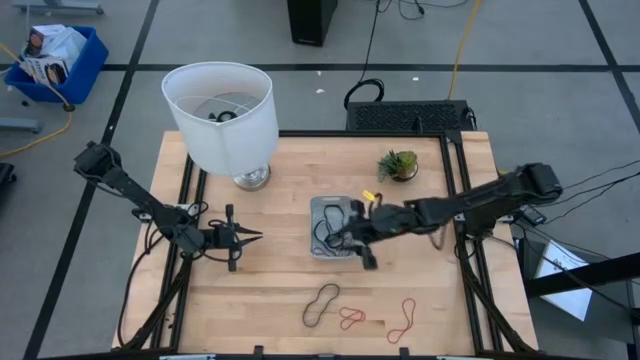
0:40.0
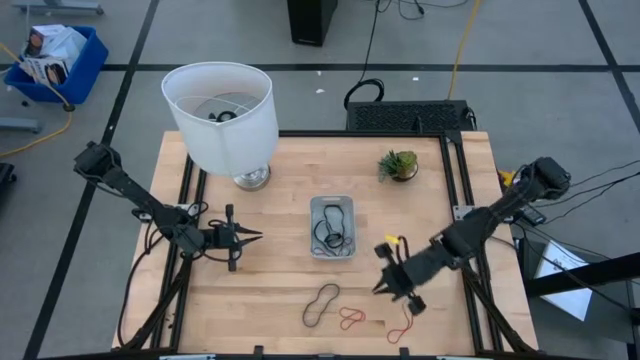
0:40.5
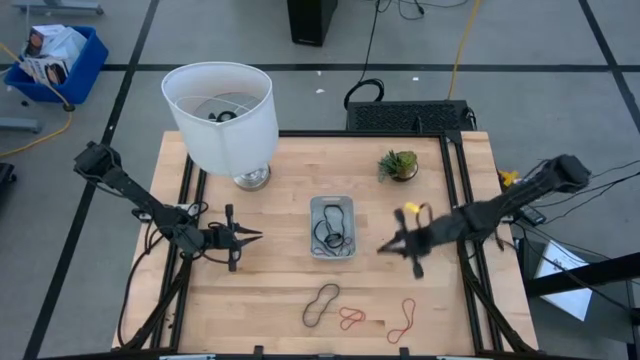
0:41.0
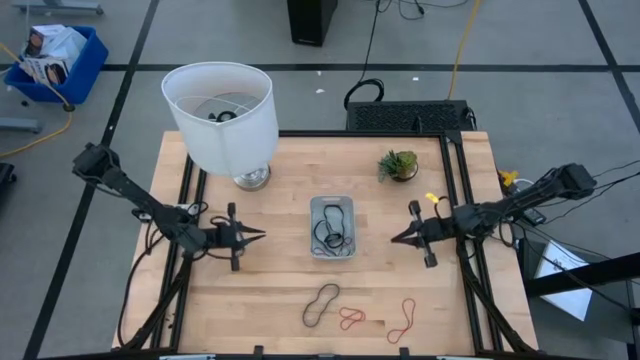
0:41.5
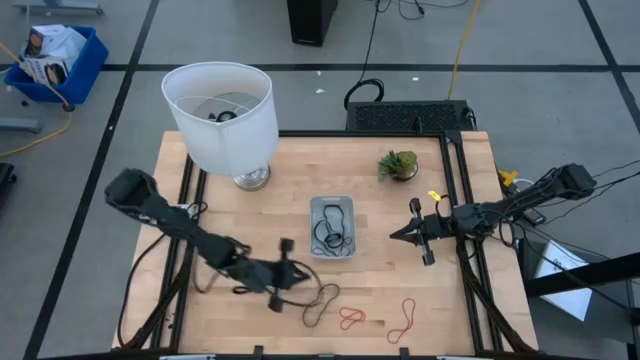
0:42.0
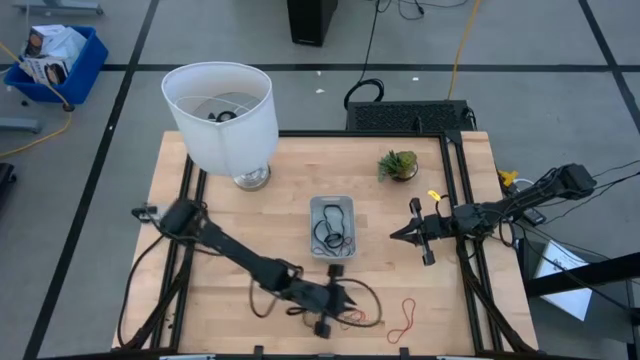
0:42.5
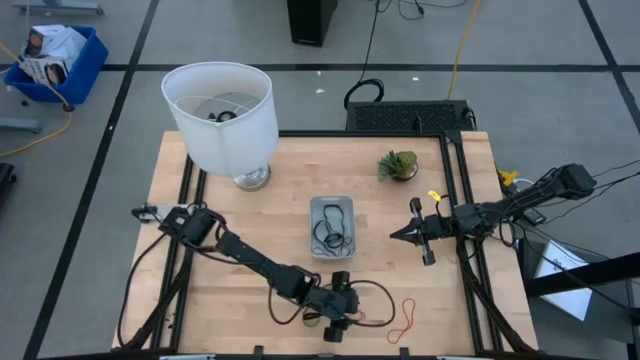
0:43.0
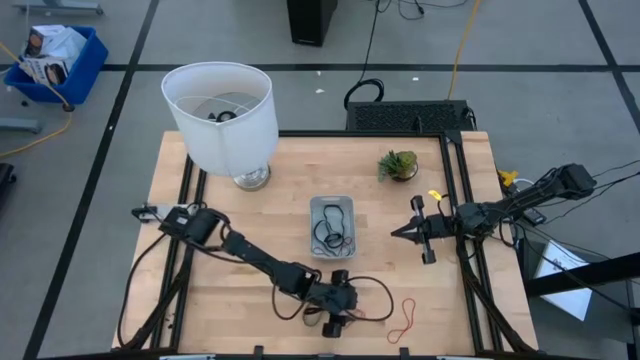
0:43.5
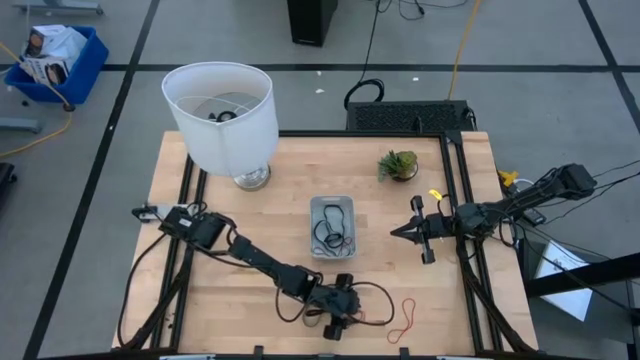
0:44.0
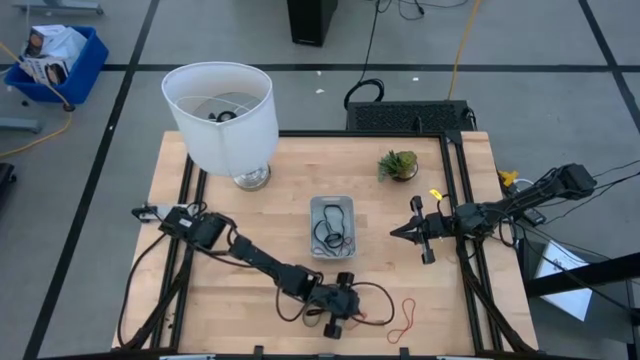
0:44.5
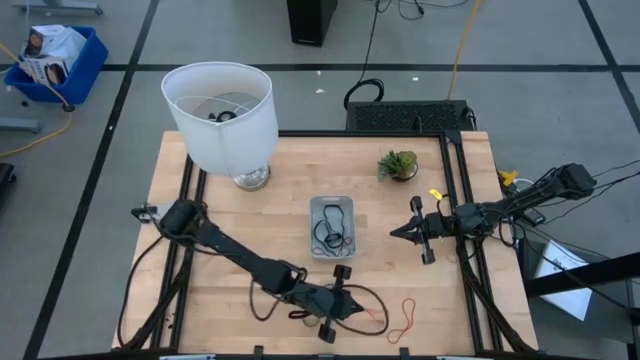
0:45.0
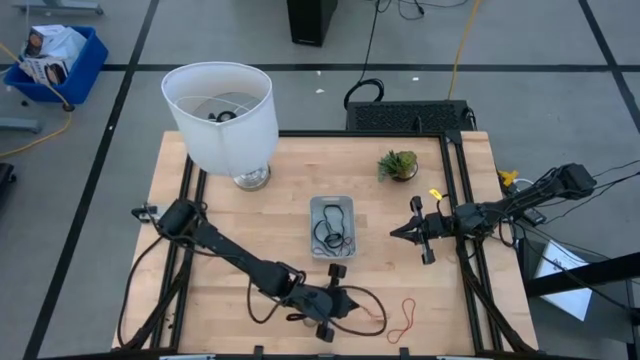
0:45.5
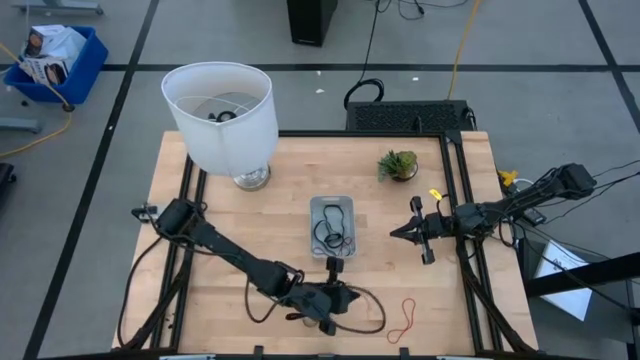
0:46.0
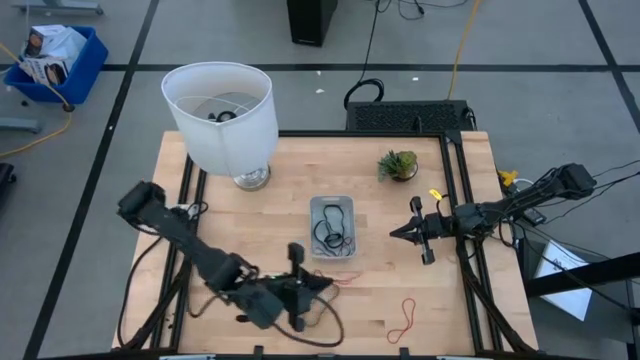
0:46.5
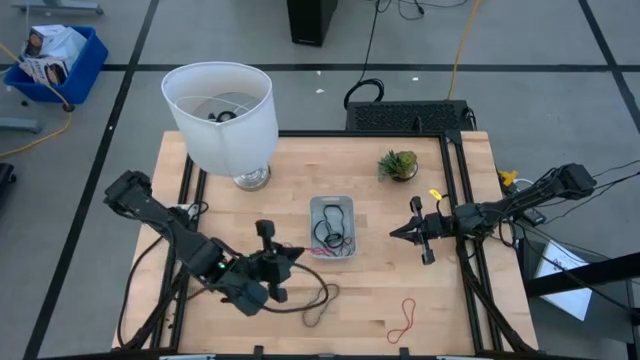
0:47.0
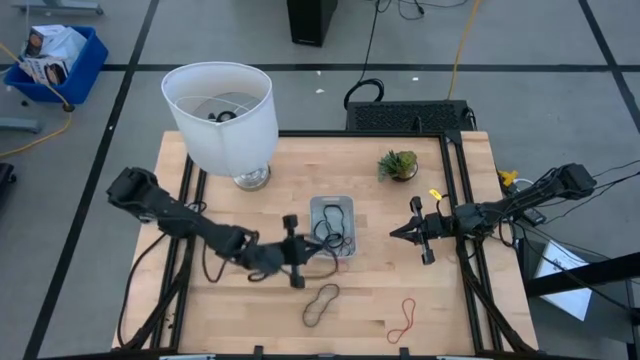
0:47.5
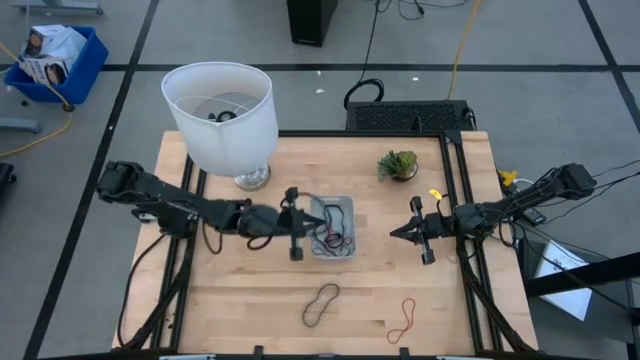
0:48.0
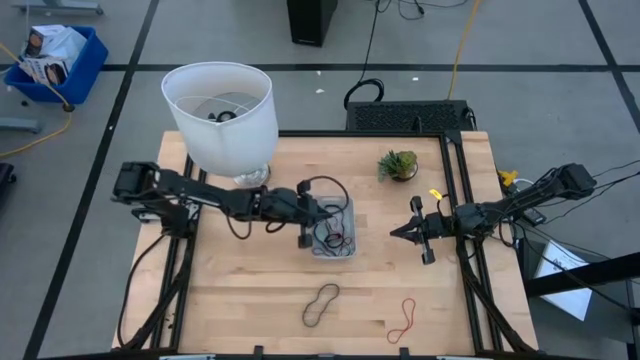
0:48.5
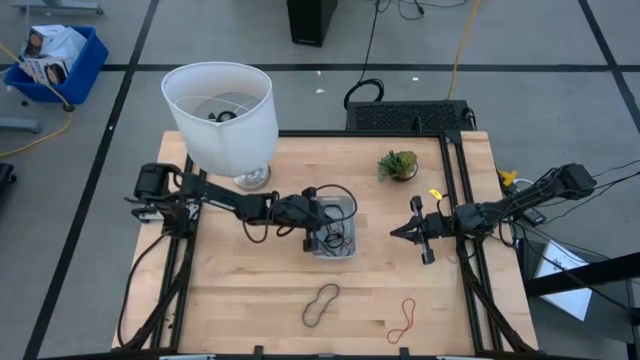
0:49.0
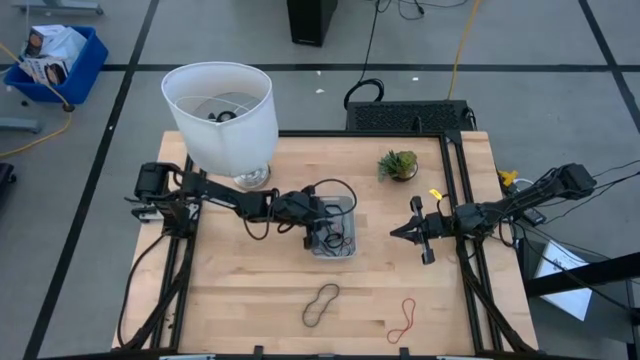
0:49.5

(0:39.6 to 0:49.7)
Task: Pick and place rubber bands into bin
Put the red rubber band into the gray bin

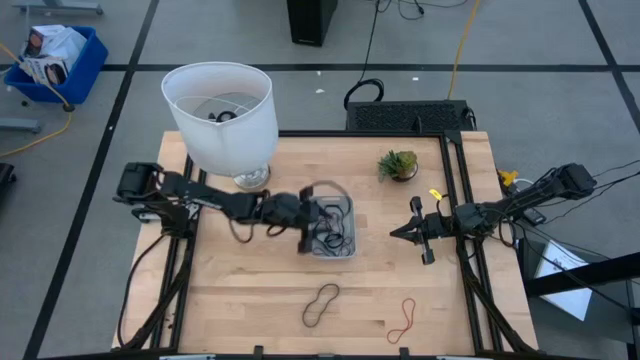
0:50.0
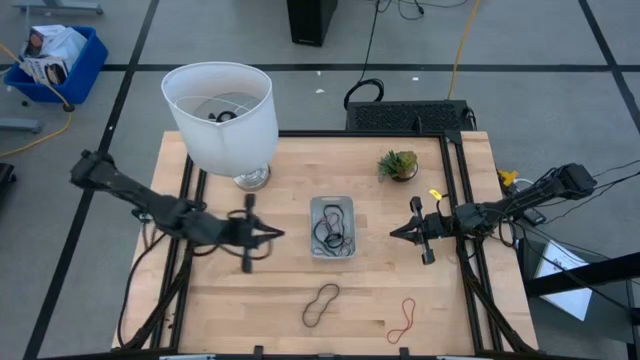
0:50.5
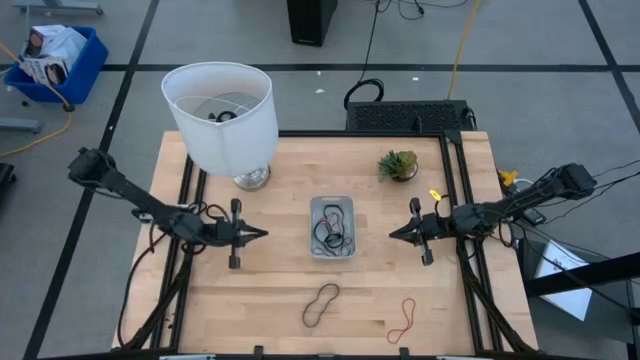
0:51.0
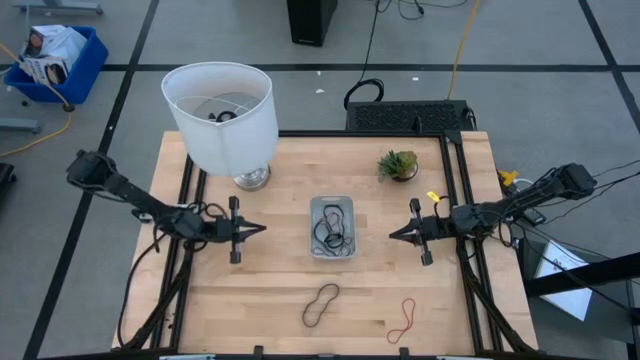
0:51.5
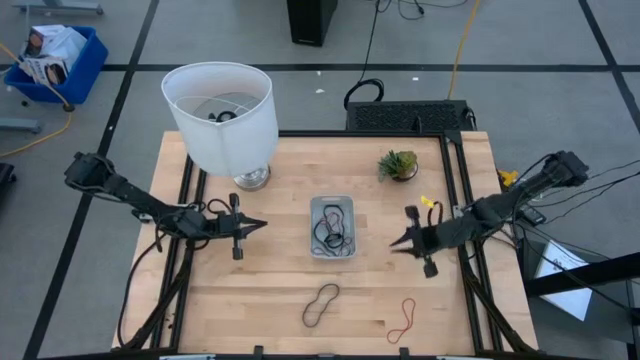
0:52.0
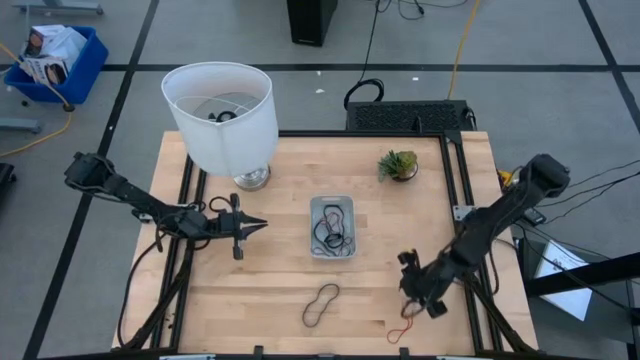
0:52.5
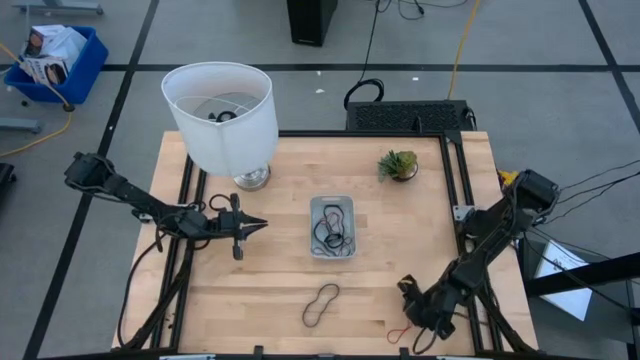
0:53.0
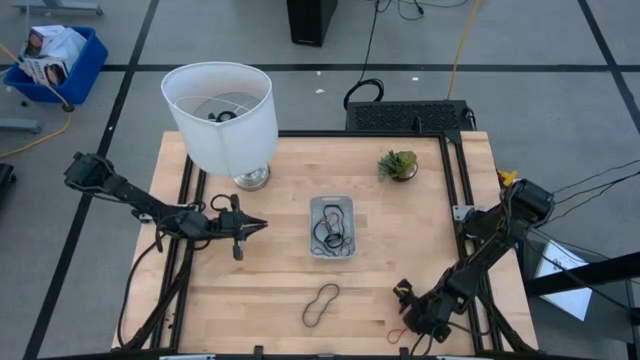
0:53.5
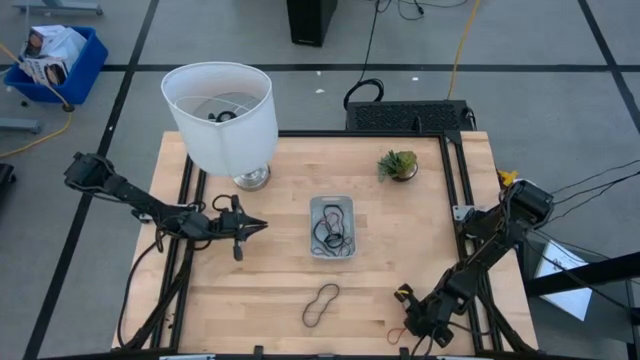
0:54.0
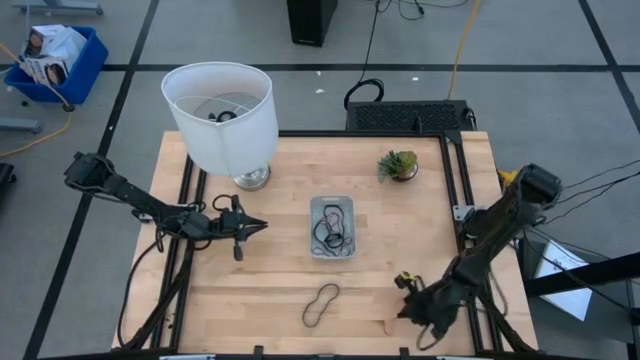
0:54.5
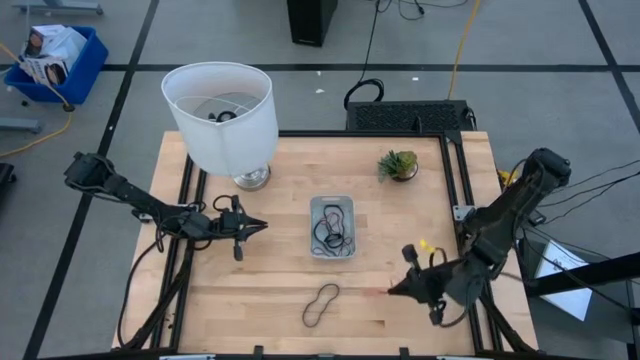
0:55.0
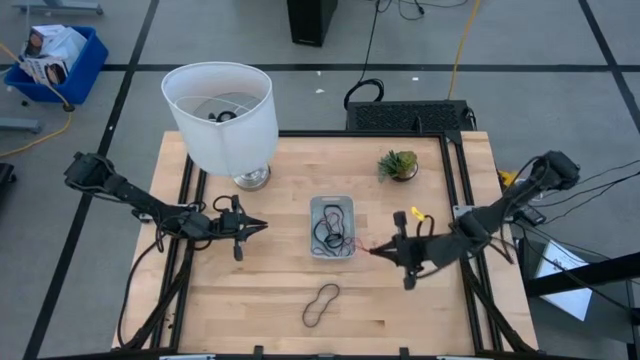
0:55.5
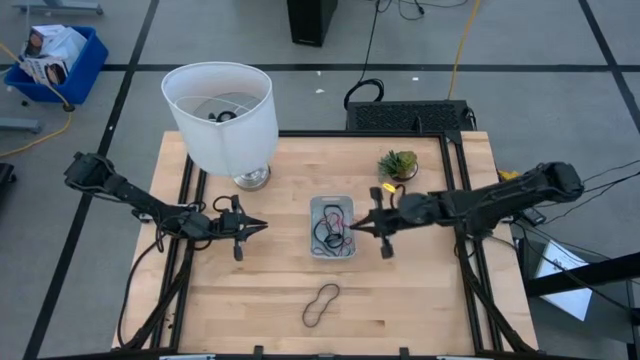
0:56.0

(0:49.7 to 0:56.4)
Put the red rubber band into the gray bin

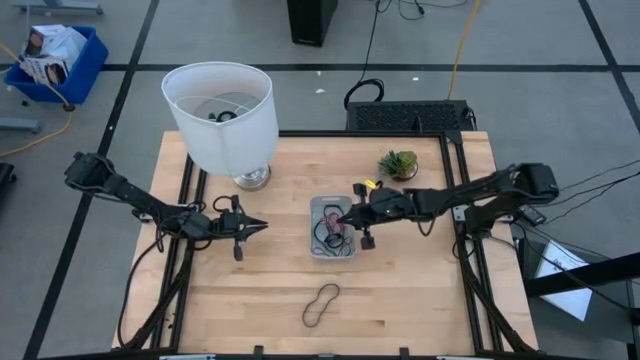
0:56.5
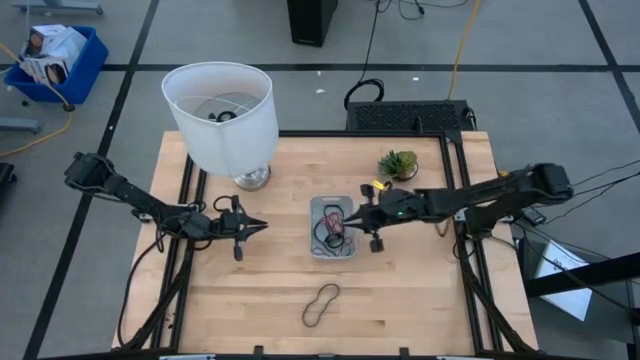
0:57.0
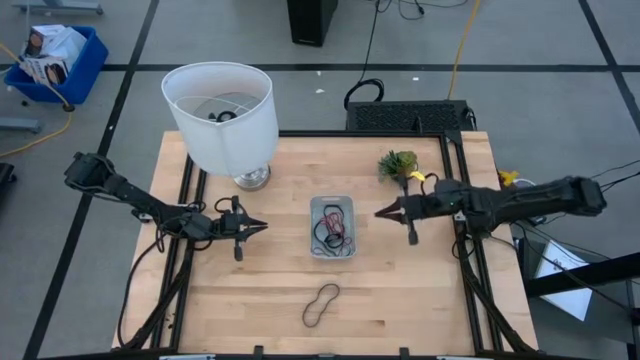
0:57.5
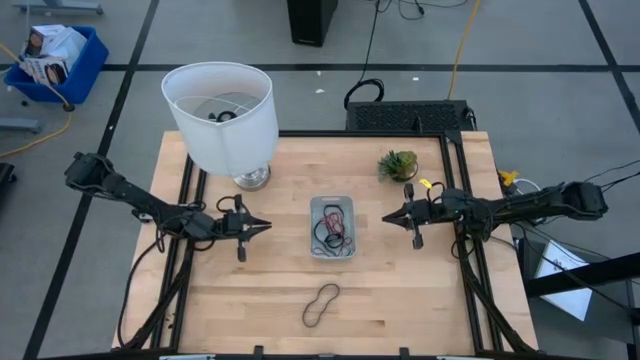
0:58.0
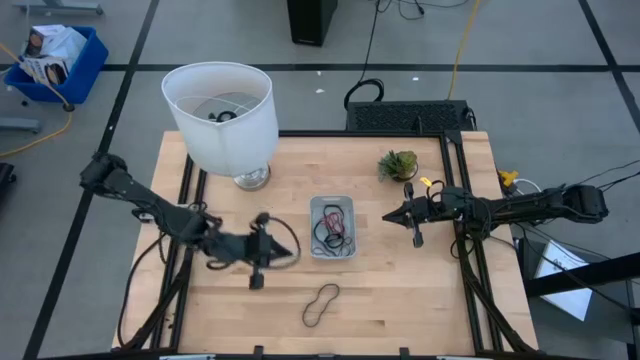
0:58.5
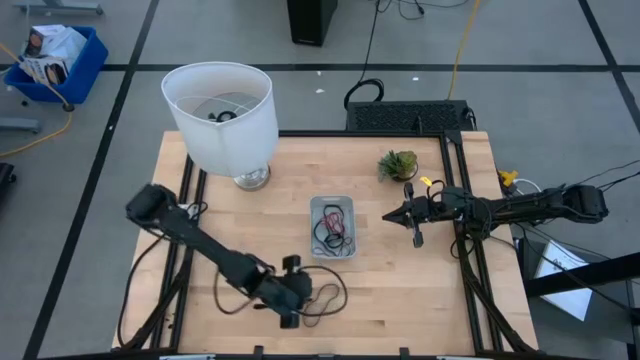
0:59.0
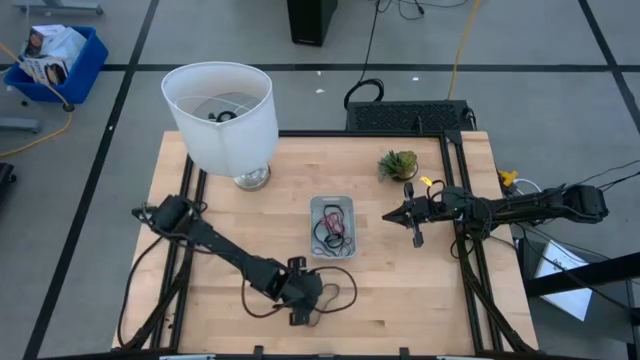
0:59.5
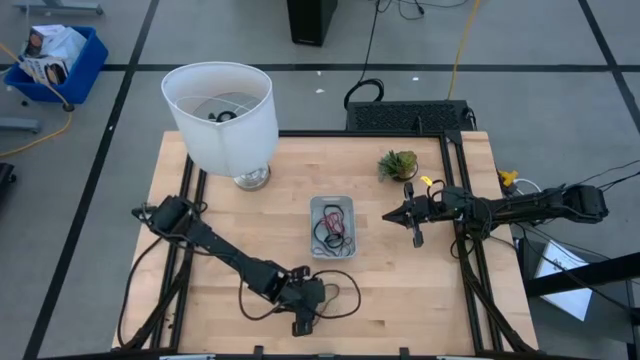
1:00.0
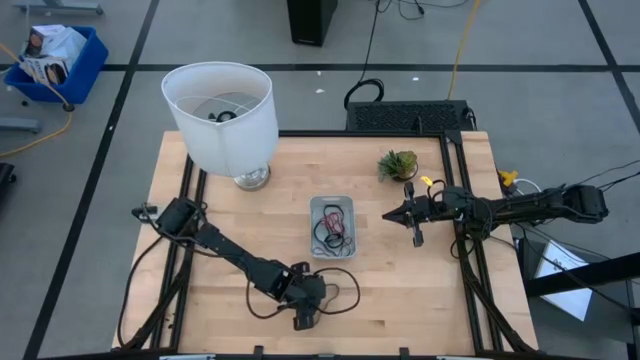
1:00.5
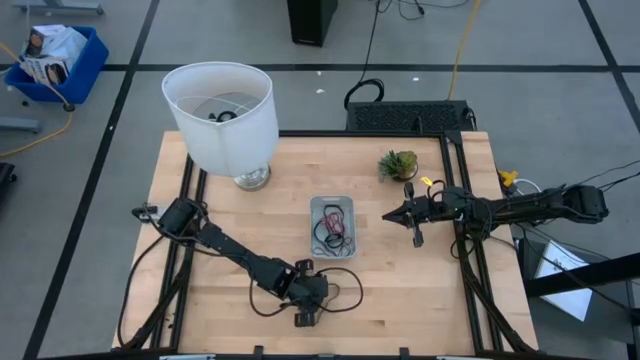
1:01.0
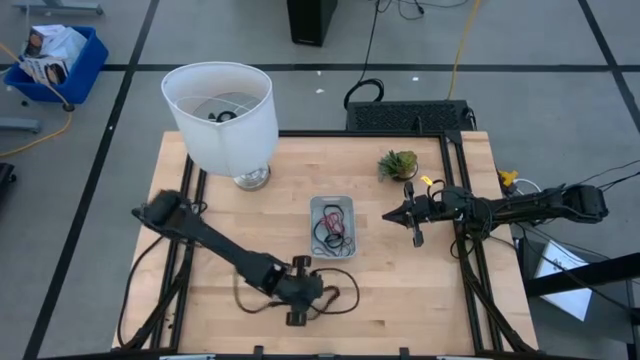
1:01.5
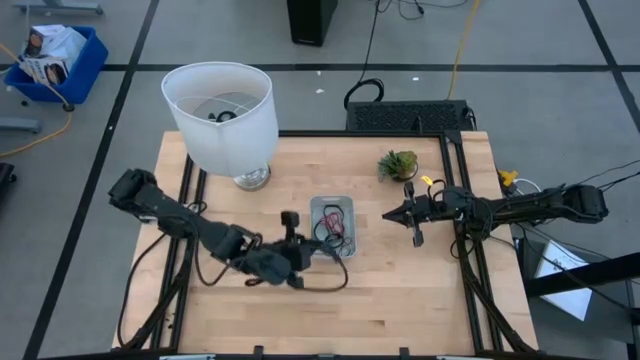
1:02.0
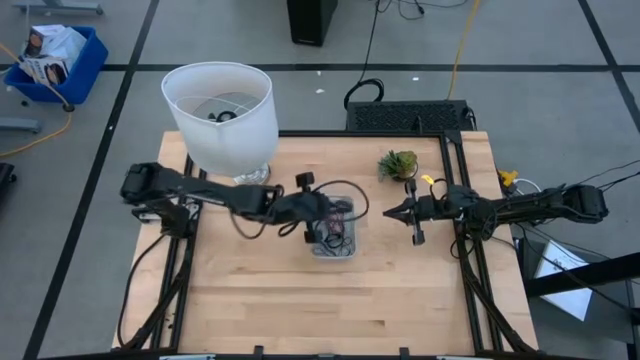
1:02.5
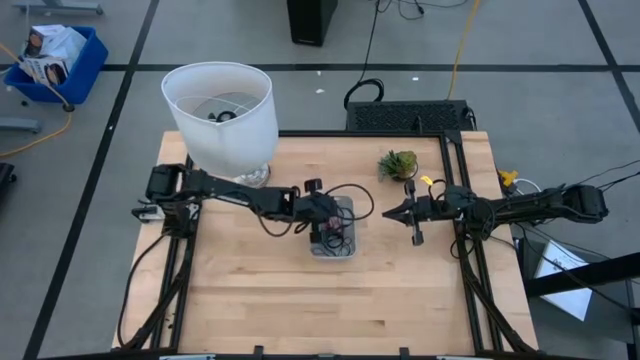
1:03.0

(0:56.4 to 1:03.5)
Put the black rubber band into the gray bin
